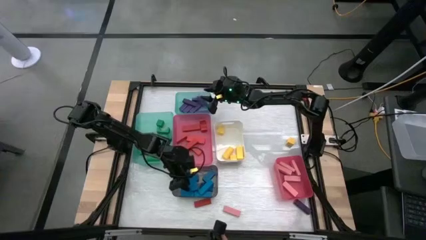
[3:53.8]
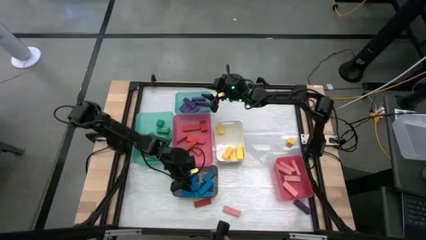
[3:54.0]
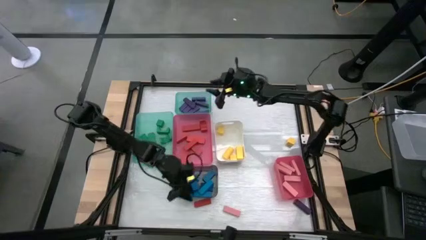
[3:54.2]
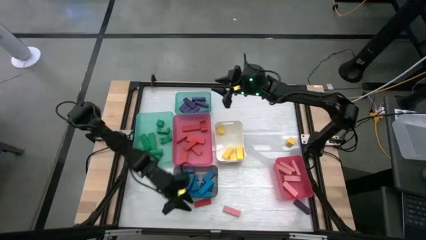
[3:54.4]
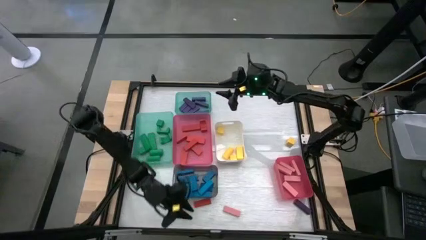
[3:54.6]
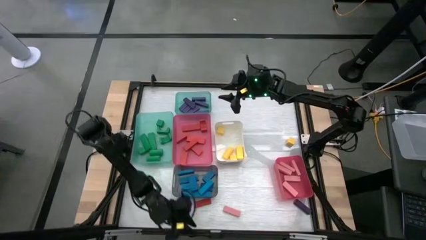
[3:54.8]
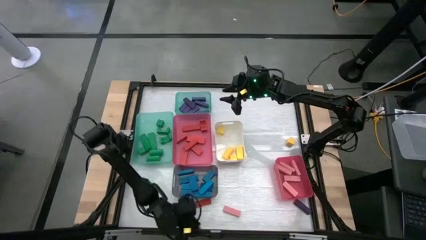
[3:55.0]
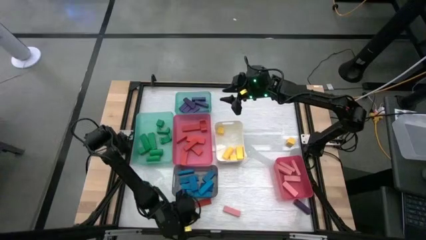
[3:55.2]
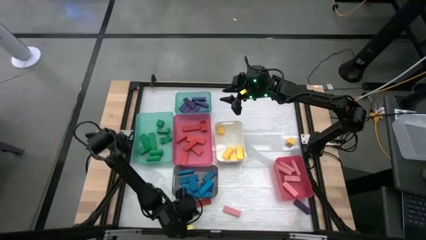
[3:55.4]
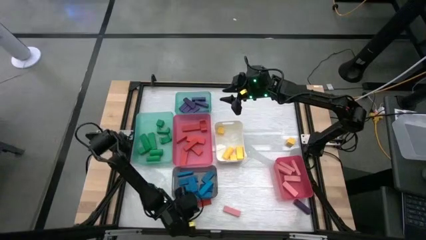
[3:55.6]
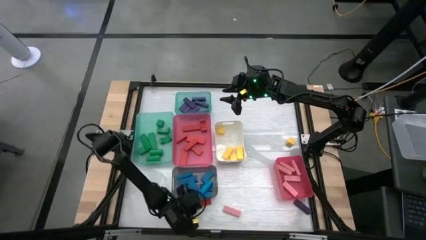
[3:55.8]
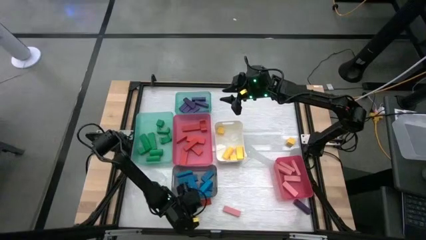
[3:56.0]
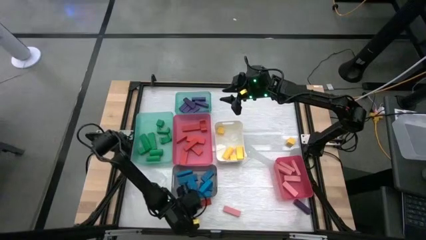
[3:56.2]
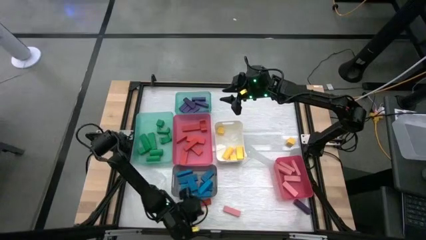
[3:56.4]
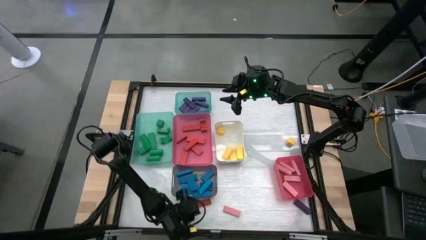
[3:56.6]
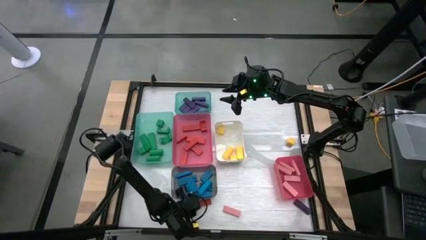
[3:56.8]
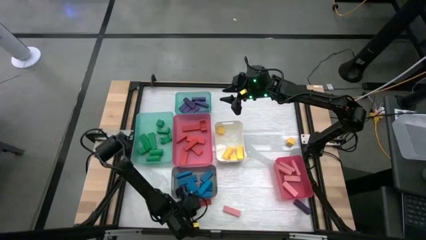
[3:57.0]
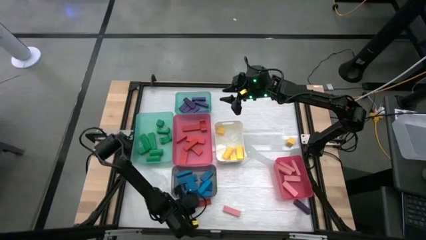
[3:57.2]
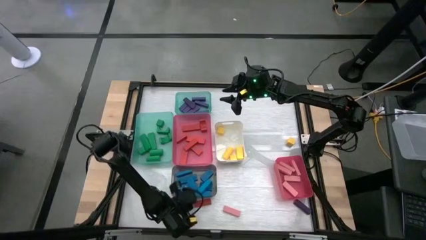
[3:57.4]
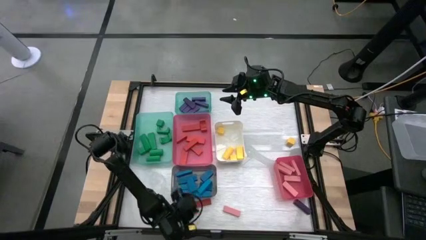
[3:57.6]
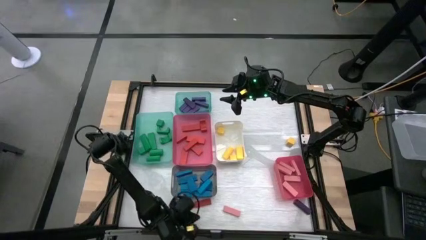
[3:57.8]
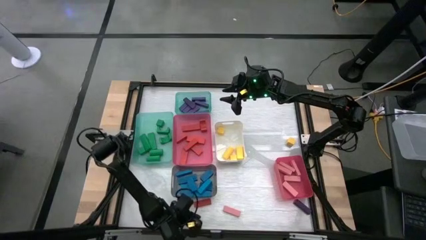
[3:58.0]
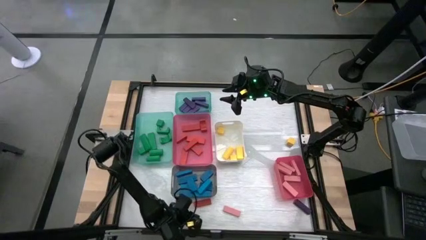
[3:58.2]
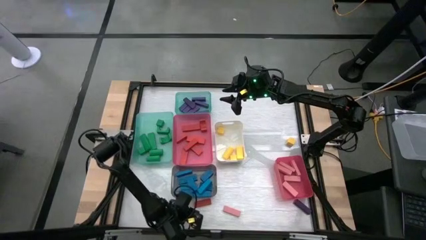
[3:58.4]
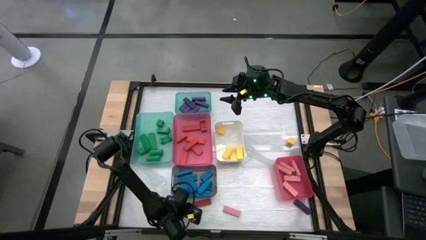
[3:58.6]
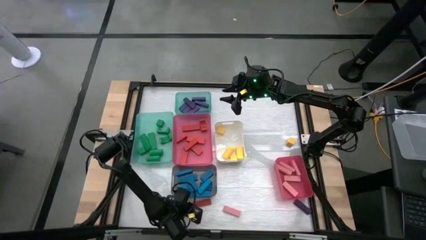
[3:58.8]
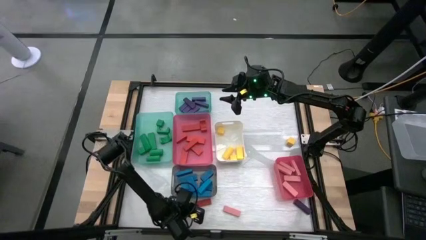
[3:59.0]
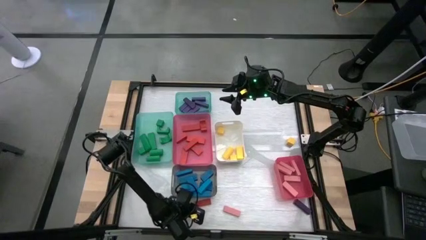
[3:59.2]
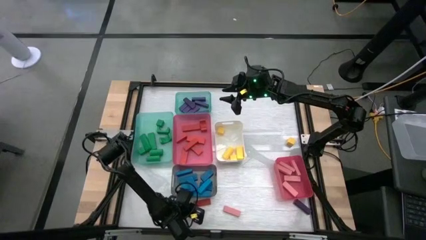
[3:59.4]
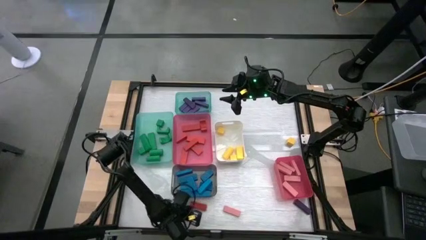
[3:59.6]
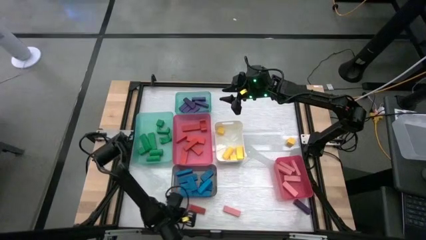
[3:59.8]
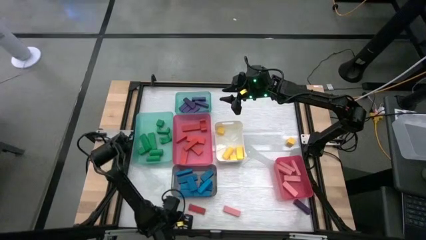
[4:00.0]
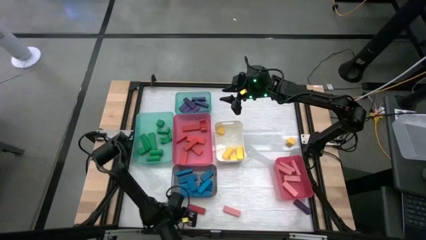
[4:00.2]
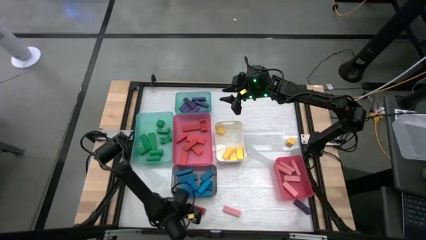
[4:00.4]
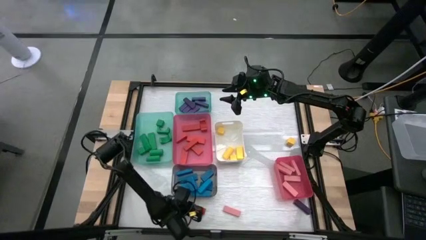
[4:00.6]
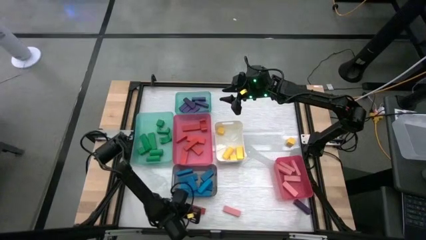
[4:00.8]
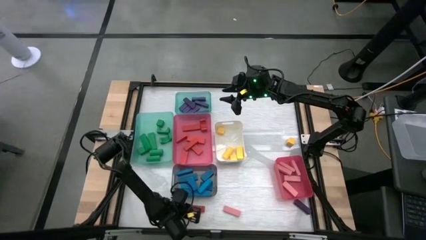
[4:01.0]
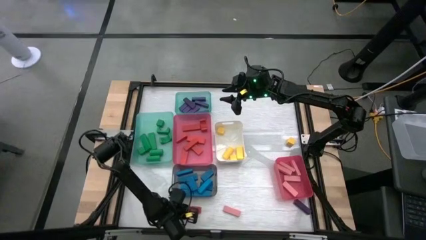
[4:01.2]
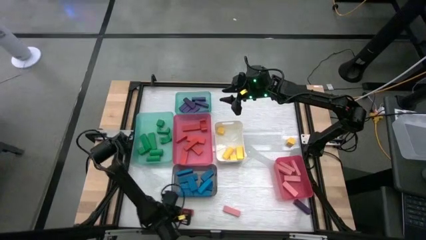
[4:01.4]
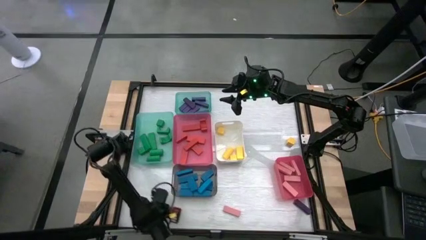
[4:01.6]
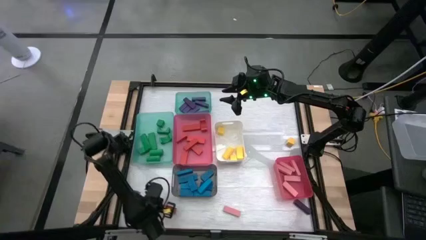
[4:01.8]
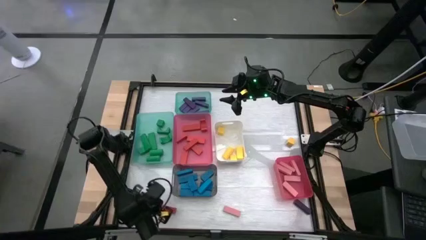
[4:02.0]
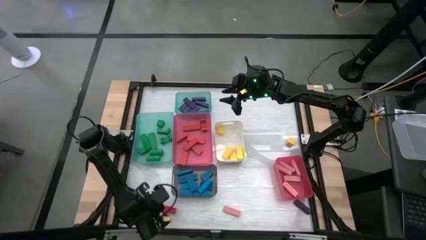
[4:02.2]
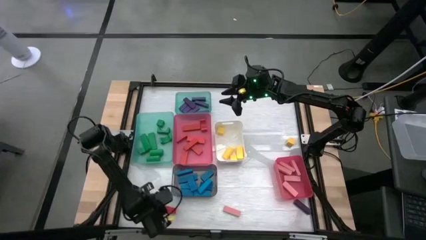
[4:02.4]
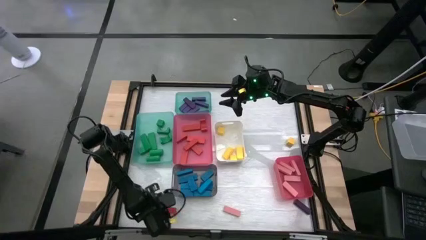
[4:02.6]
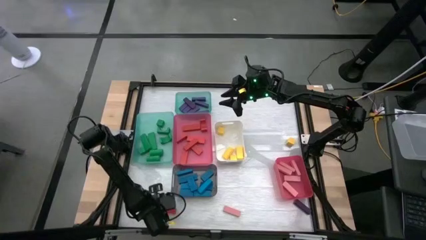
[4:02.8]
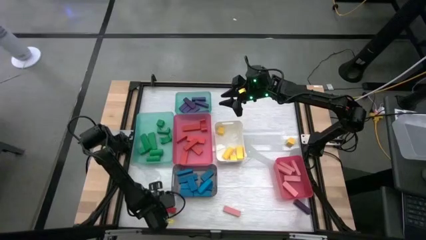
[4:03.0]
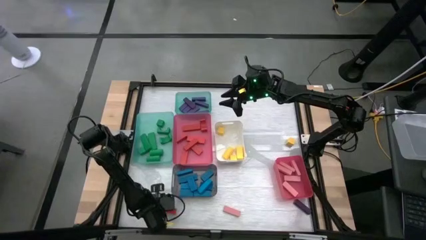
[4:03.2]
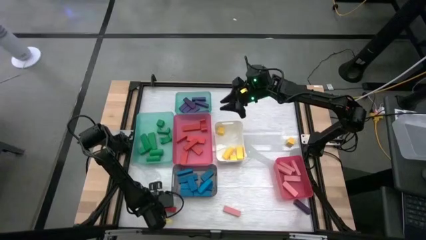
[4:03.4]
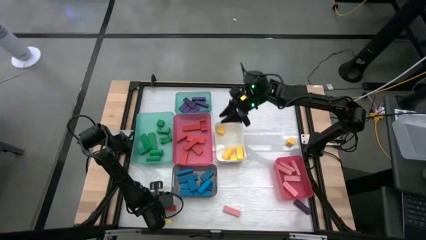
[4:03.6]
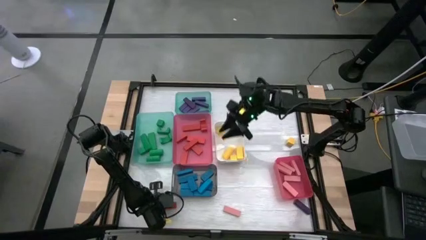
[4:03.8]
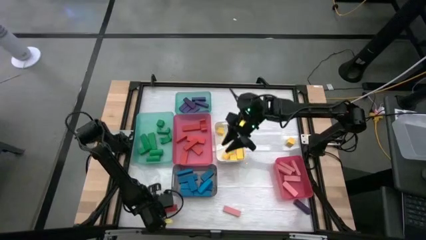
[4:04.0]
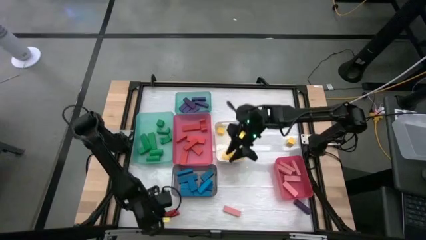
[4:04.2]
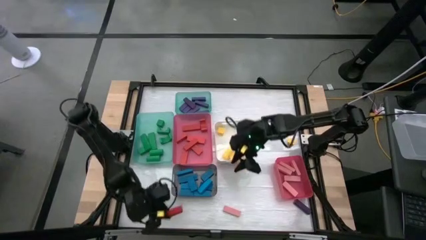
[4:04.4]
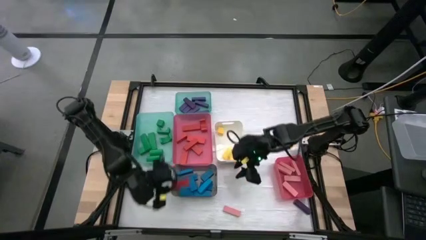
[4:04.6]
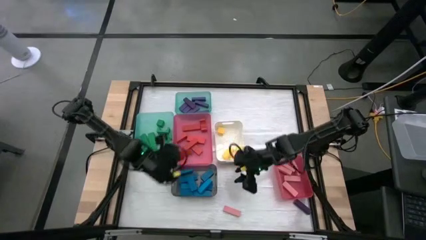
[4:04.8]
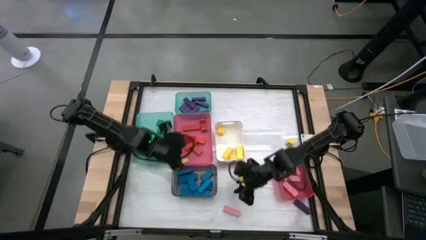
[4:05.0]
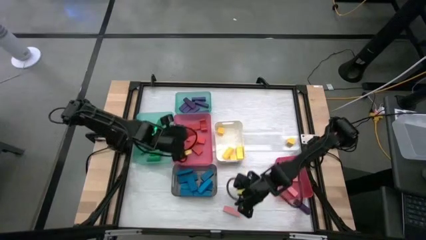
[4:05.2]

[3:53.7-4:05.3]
Task: Sort blocks
Put the red block into the top pink bin

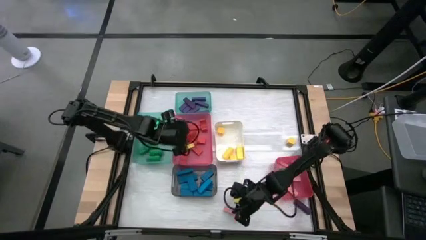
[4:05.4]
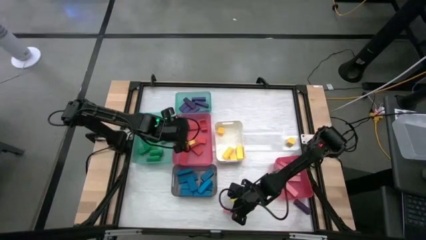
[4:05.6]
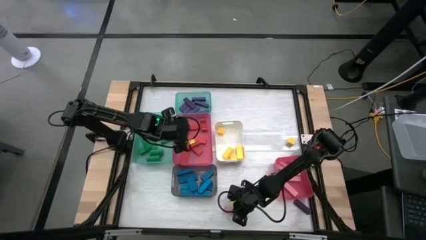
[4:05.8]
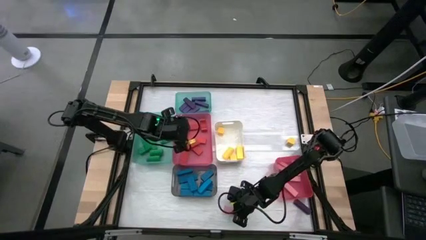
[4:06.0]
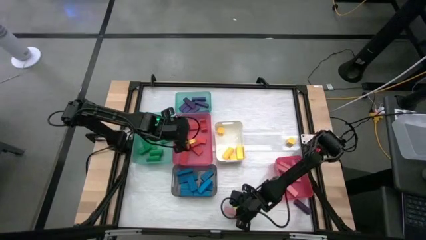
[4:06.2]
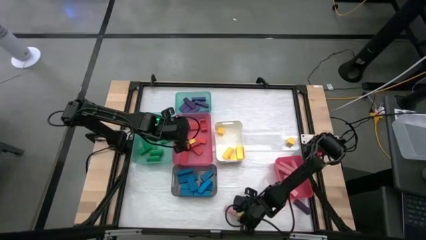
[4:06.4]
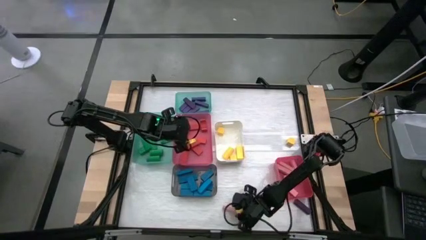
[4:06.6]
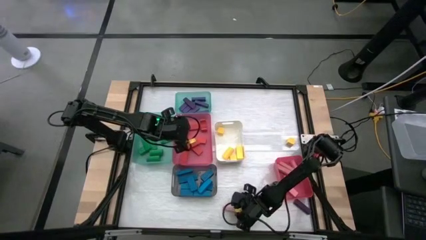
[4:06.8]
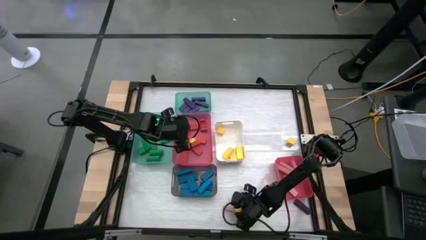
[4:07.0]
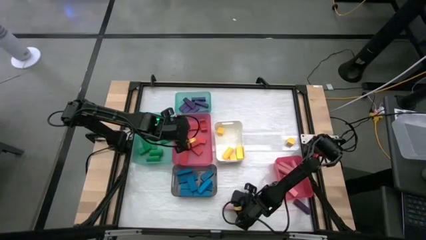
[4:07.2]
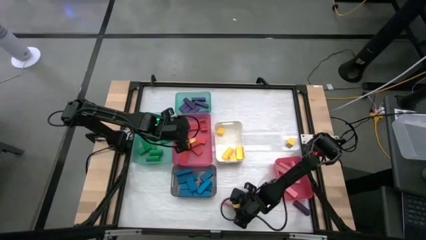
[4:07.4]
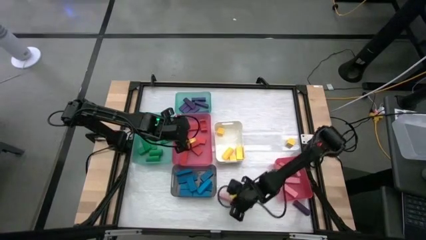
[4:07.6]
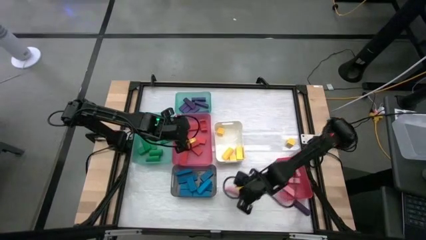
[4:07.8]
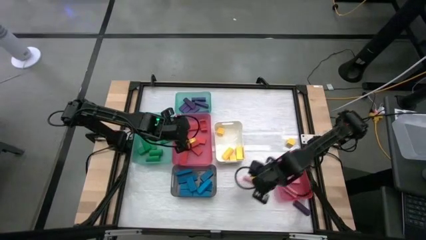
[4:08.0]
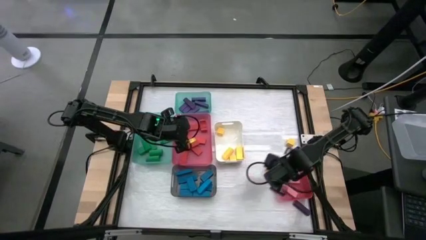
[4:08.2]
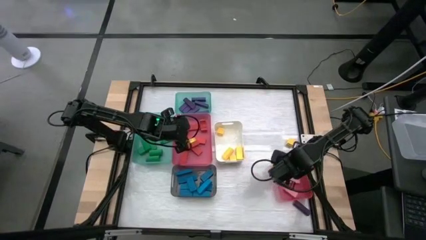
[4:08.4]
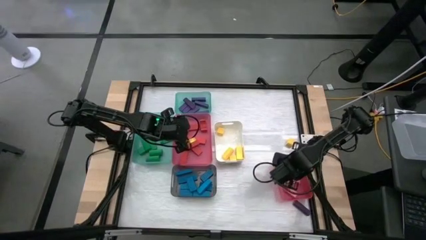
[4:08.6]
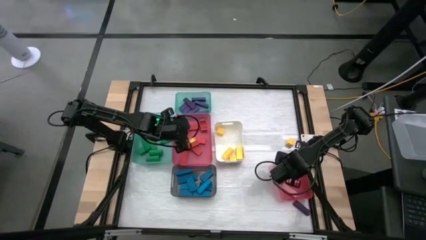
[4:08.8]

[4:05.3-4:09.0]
Put the pink block into the bottom pink bin
